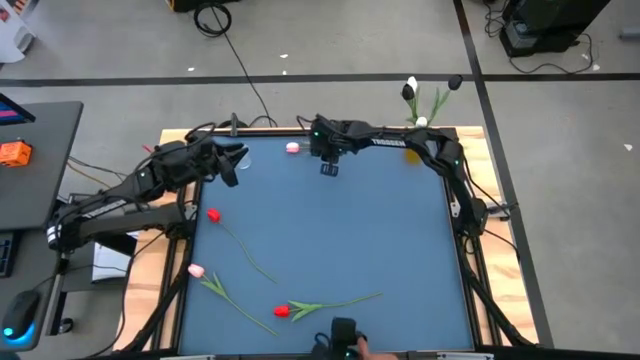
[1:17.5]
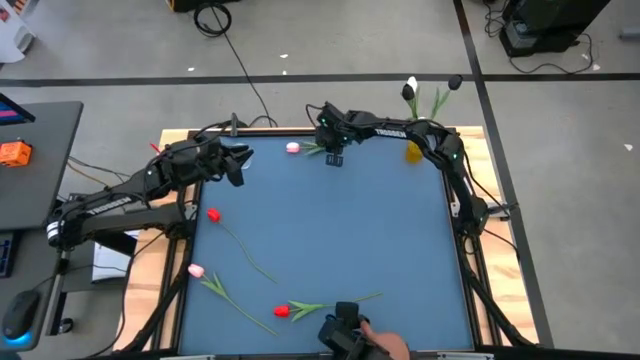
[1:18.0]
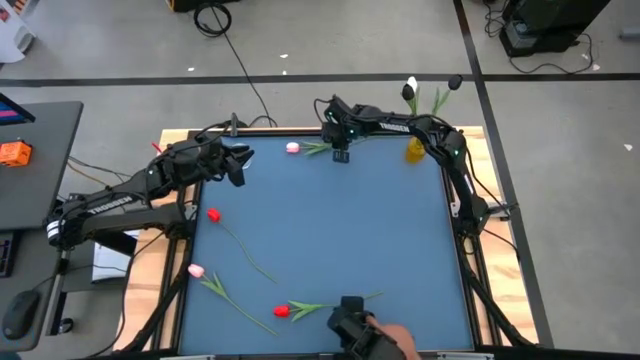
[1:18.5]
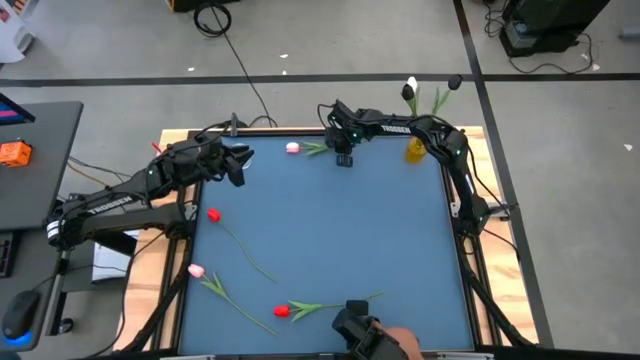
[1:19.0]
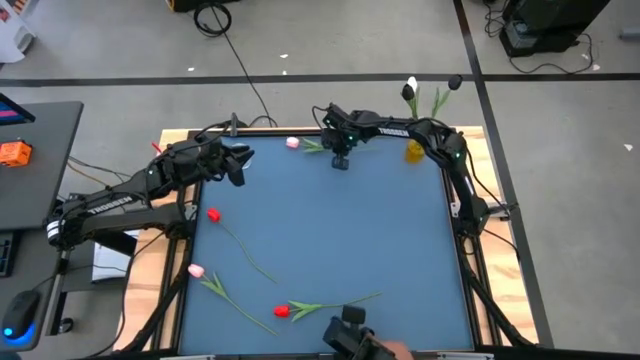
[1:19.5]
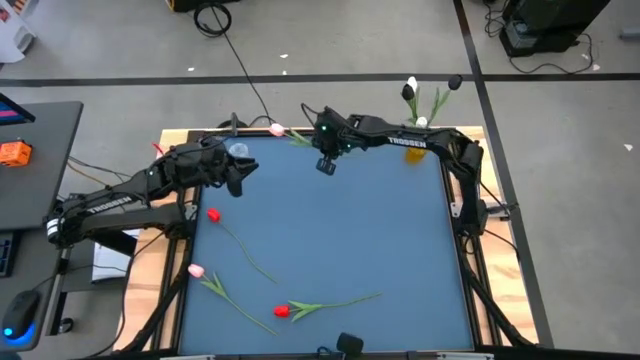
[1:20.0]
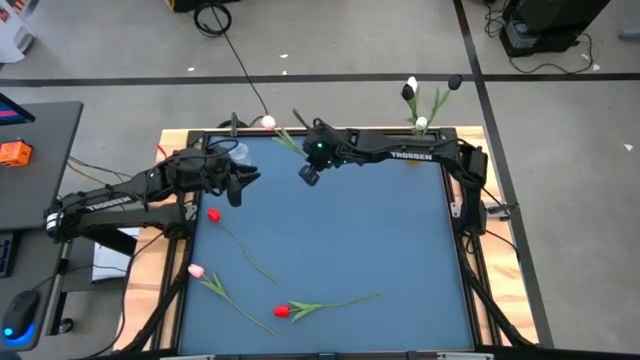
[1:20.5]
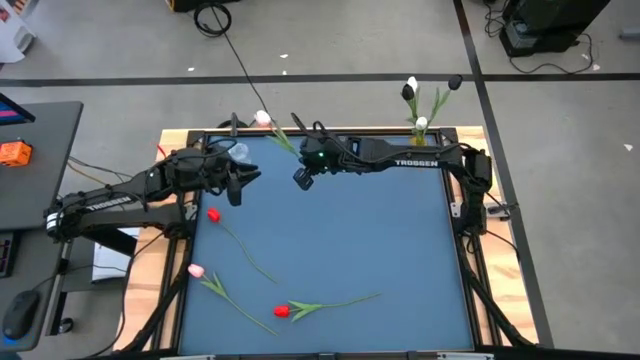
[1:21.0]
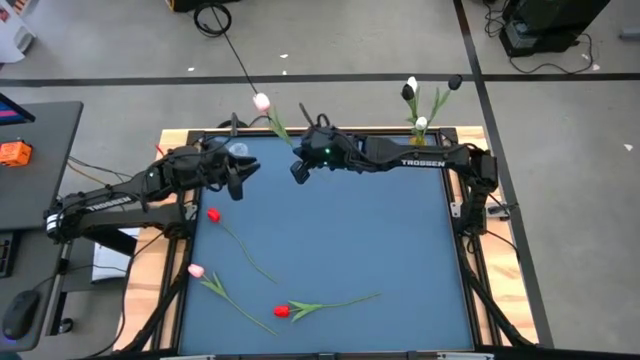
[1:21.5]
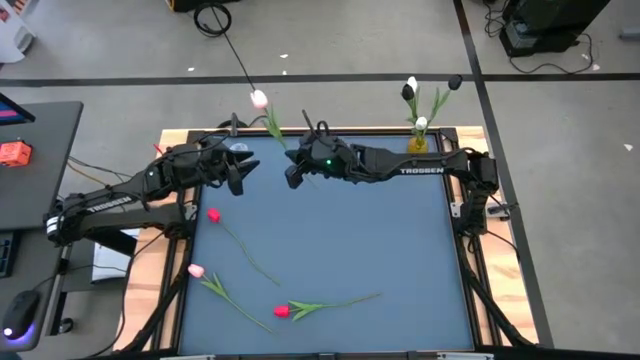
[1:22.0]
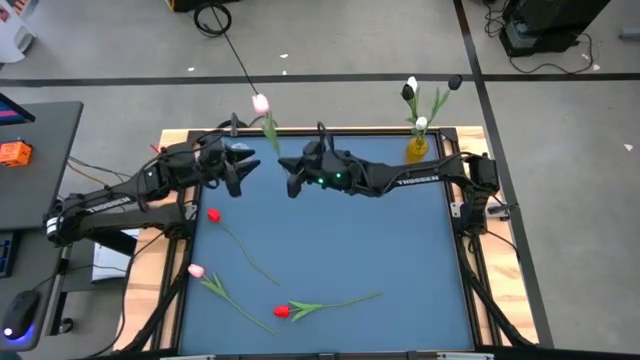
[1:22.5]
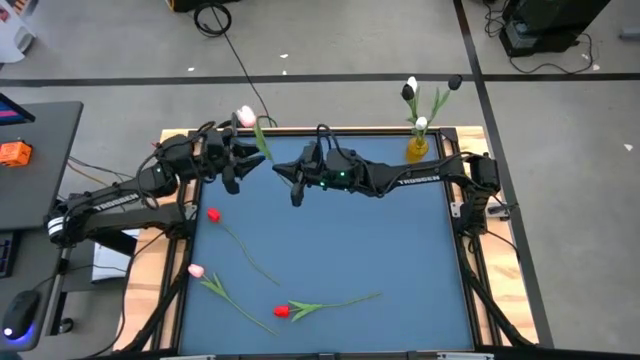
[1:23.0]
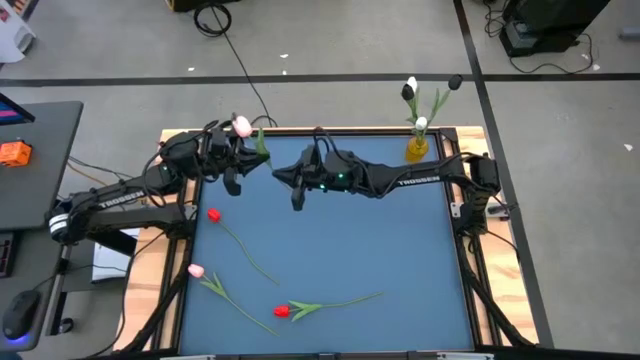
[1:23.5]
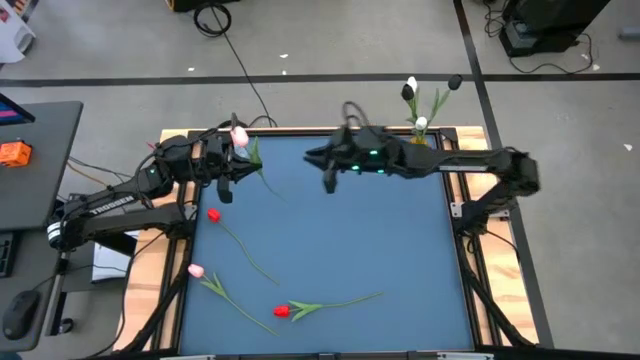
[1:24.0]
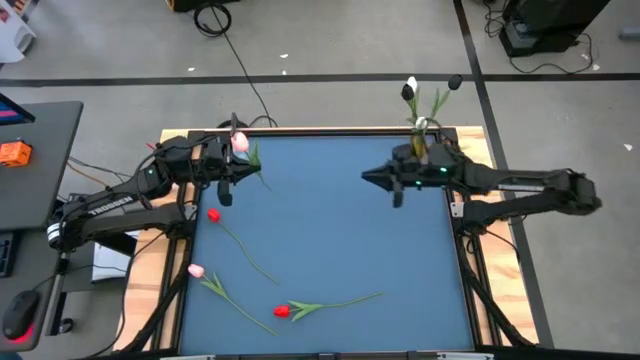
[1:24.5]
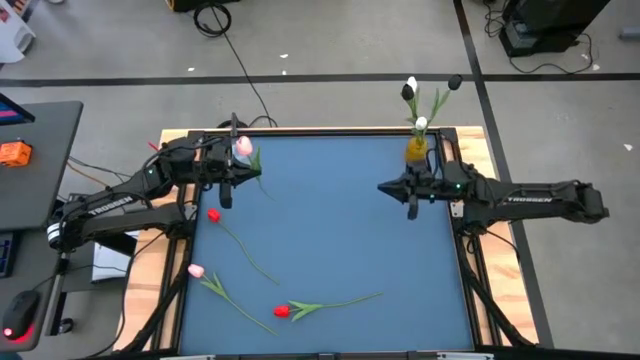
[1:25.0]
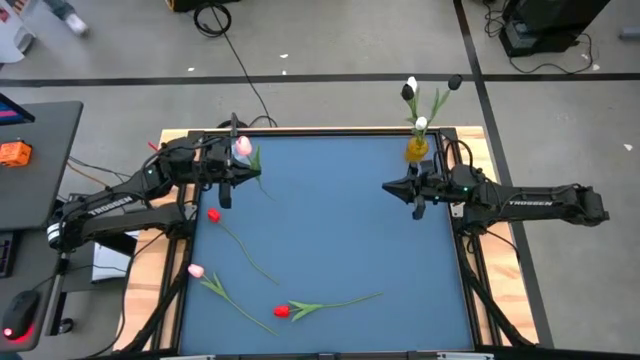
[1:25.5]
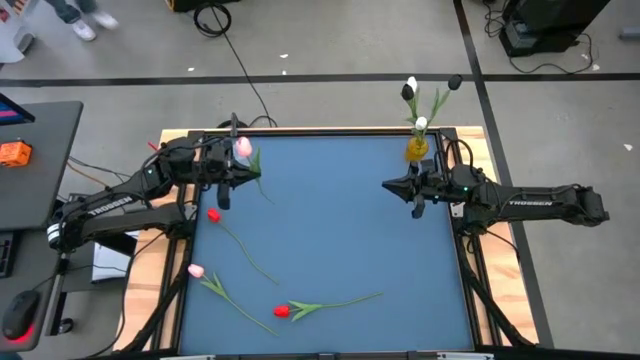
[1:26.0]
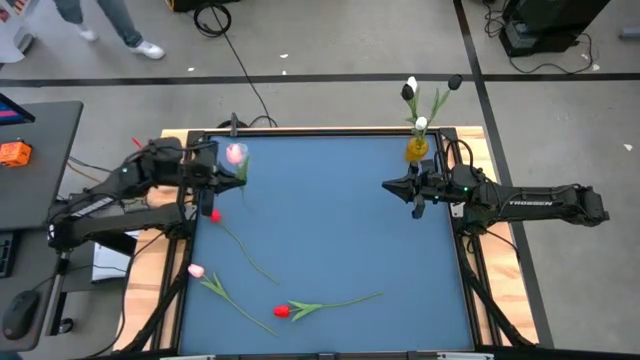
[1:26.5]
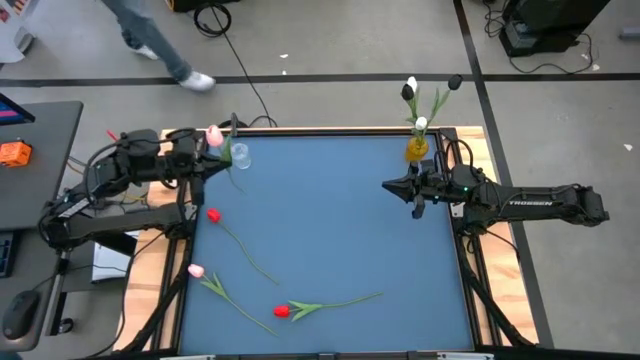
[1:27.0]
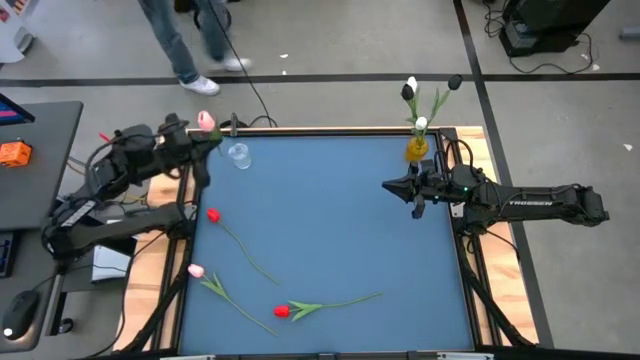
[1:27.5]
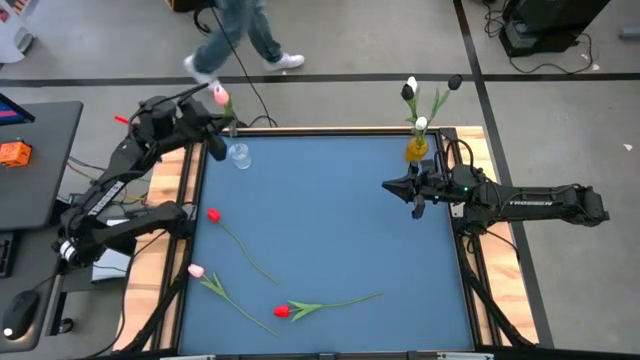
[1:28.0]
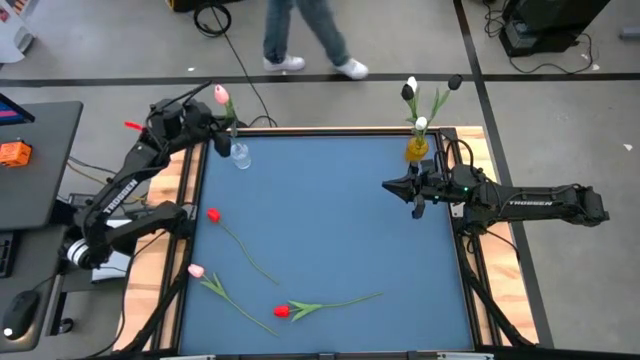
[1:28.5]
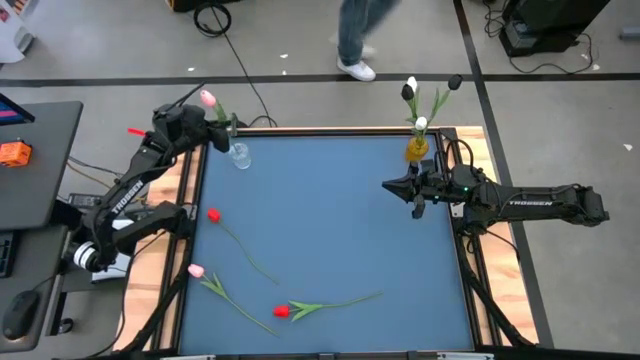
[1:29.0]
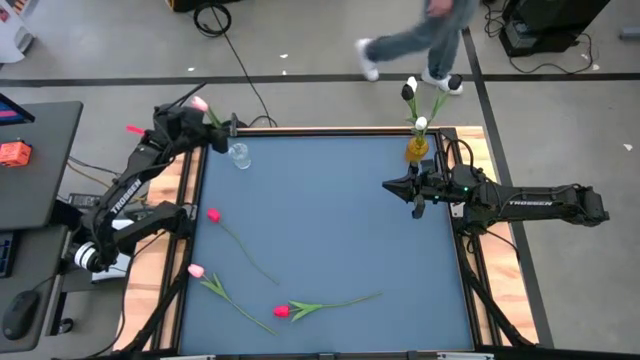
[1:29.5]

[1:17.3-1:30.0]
Task: Sort flowers into vase by color
Put the top pink tulip into the transparent vase

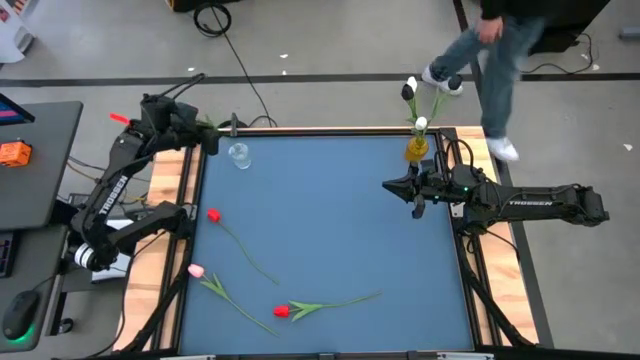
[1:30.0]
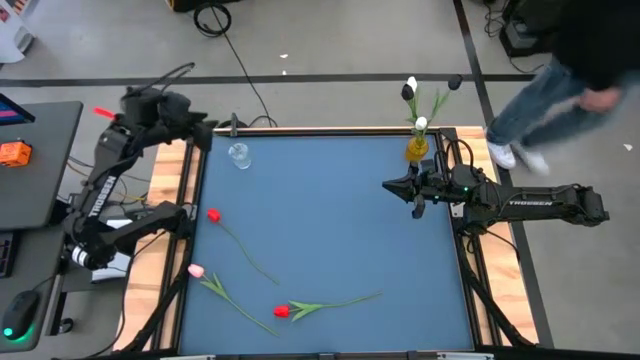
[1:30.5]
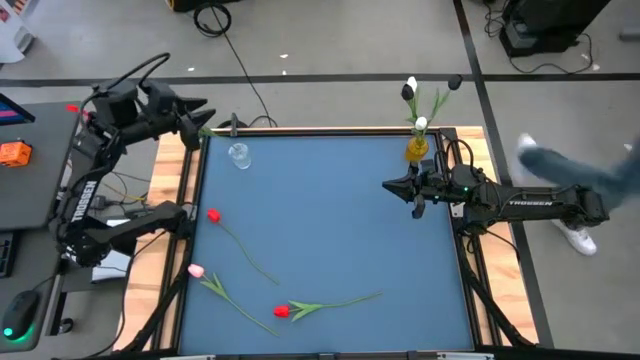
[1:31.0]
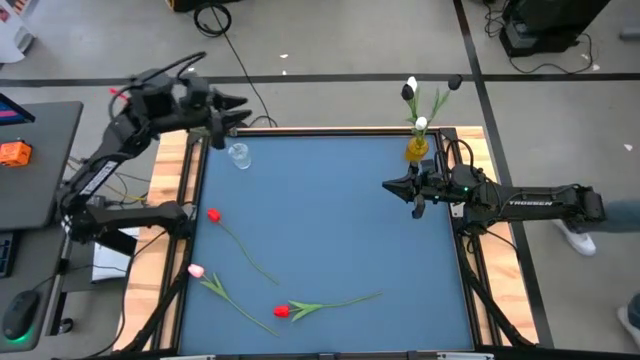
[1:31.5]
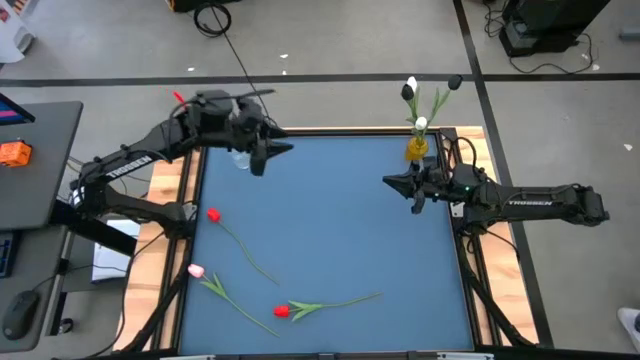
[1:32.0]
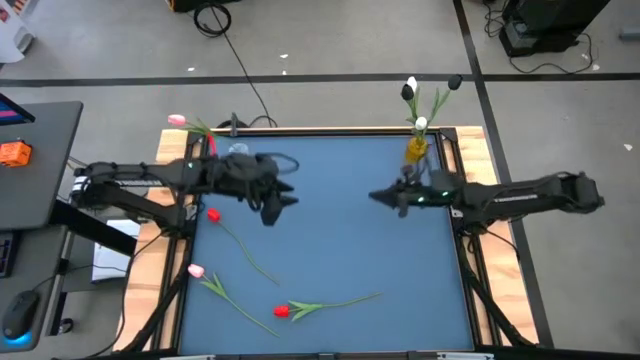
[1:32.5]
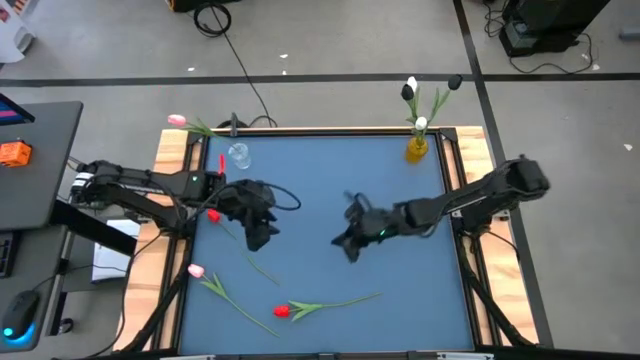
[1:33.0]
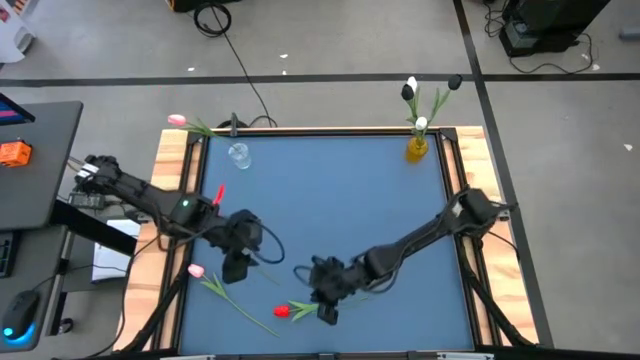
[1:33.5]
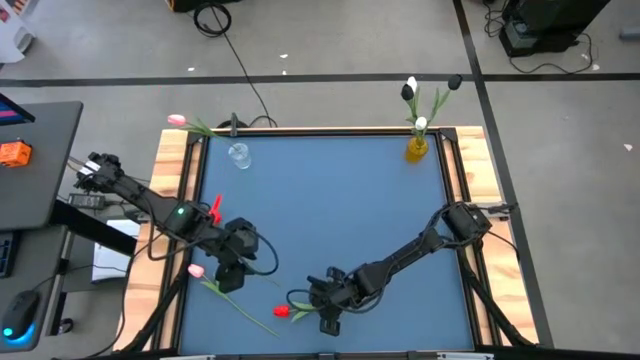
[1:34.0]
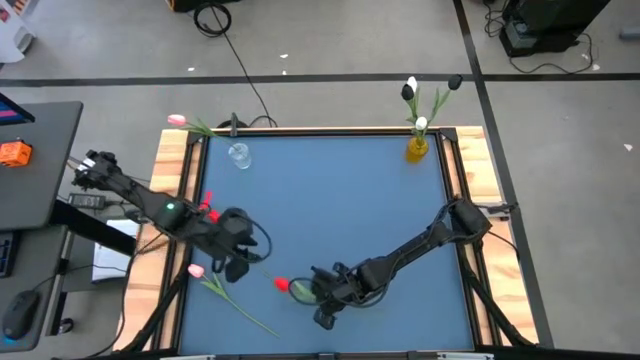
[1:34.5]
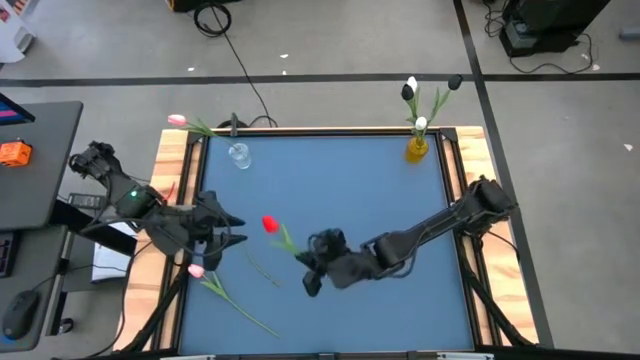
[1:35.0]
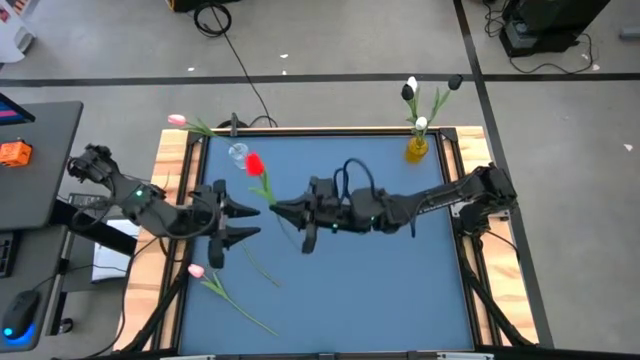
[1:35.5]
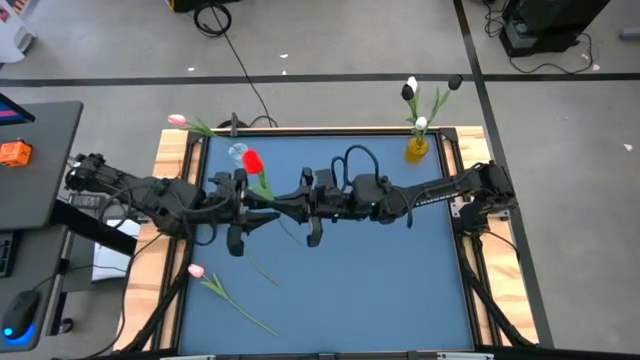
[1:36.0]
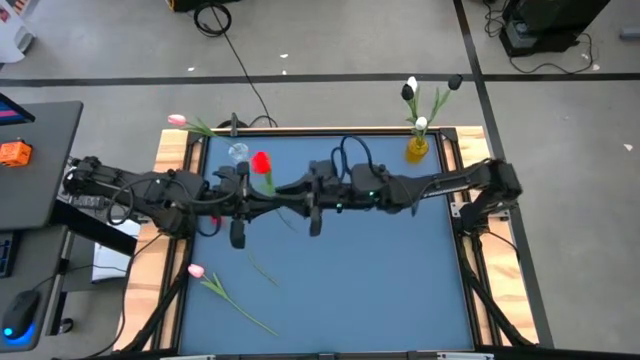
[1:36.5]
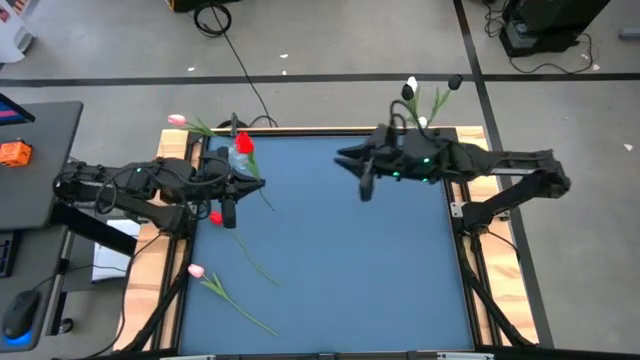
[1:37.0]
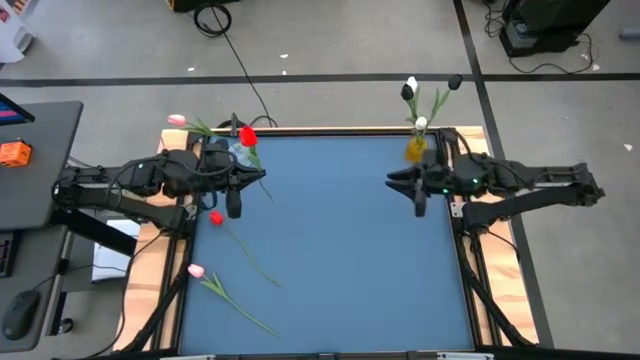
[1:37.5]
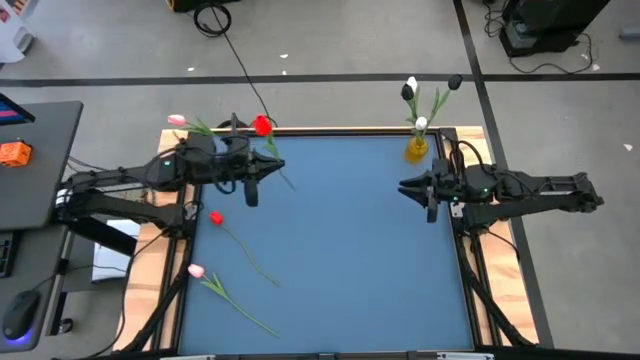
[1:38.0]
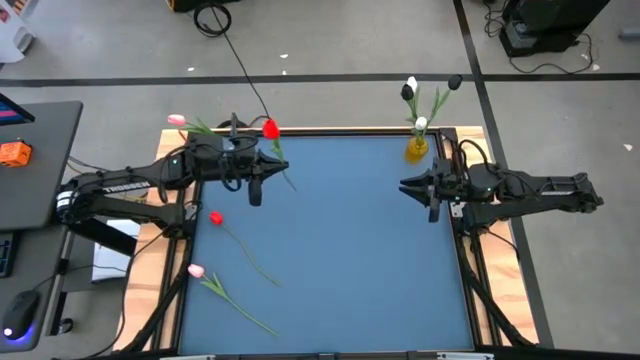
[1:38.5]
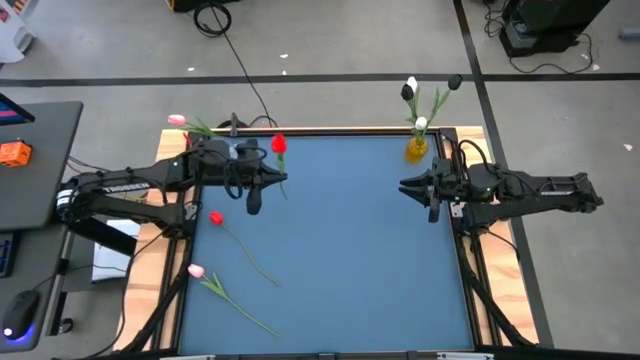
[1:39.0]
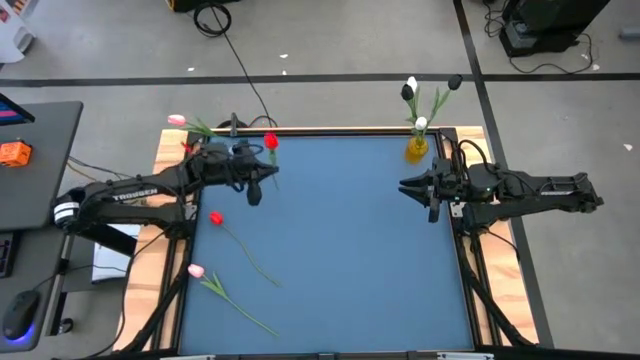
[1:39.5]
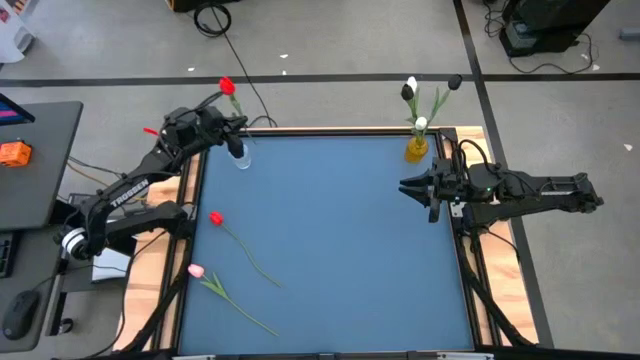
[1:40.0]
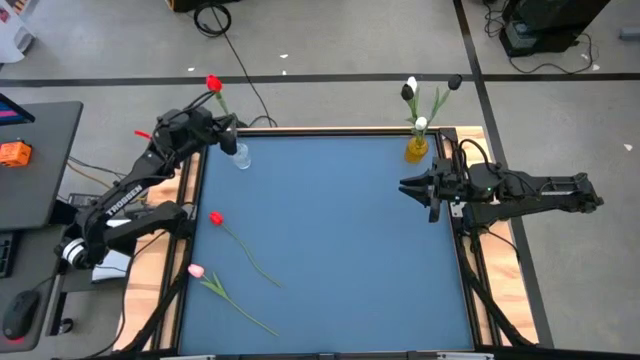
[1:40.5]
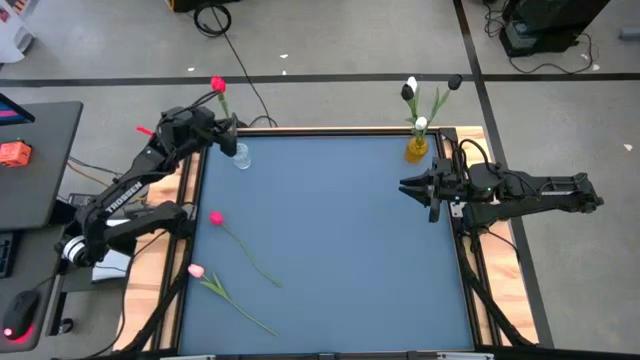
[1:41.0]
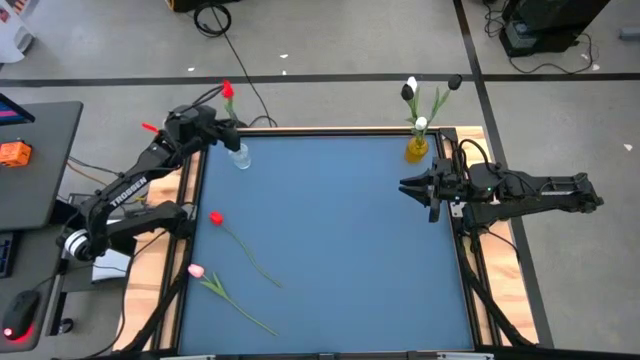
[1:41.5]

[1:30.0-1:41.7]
Put the bottom red tulip into the transparent vase
